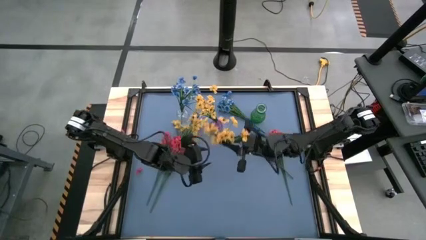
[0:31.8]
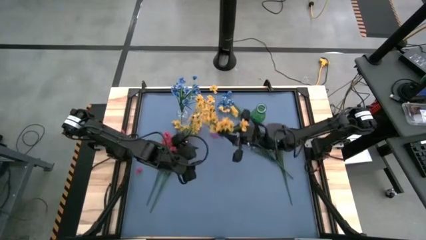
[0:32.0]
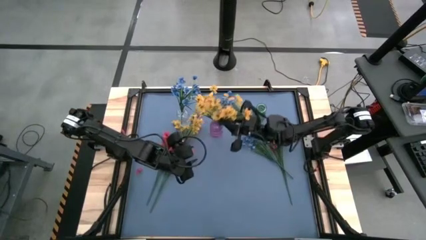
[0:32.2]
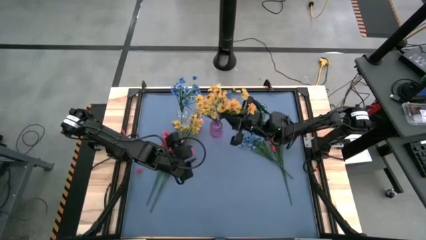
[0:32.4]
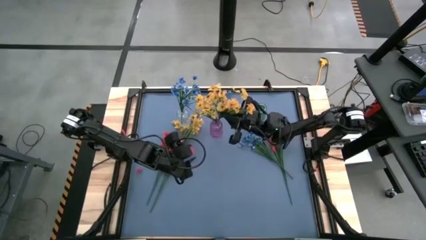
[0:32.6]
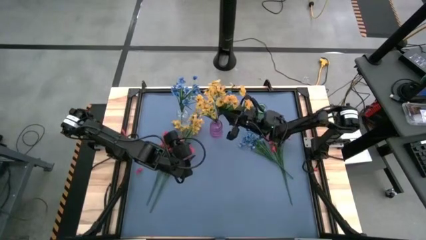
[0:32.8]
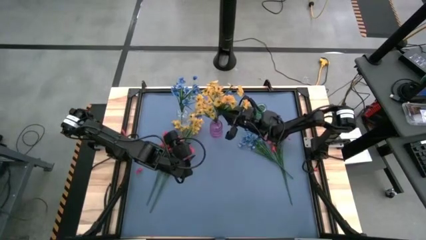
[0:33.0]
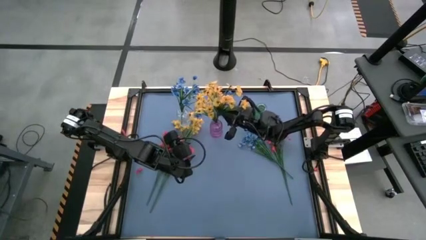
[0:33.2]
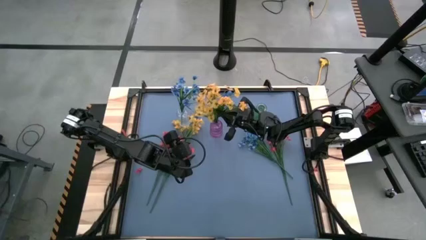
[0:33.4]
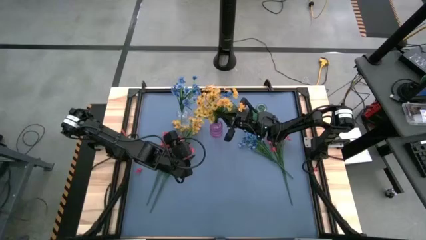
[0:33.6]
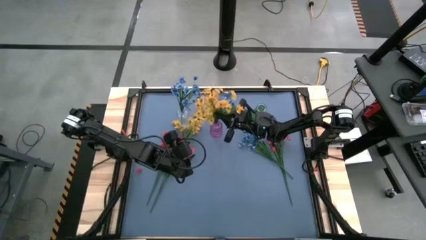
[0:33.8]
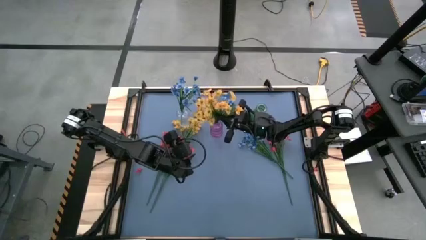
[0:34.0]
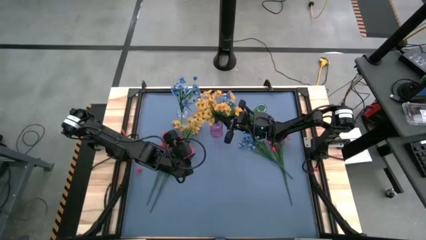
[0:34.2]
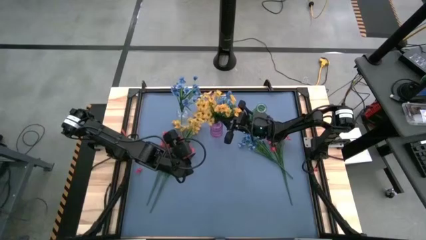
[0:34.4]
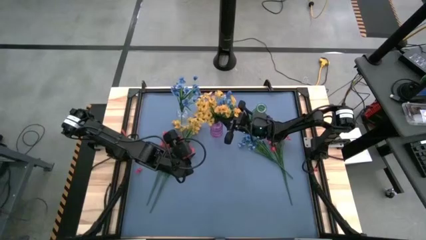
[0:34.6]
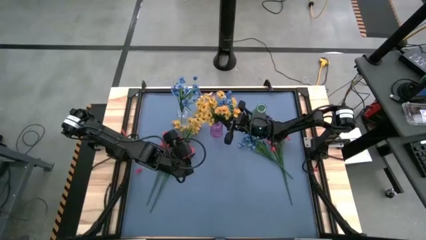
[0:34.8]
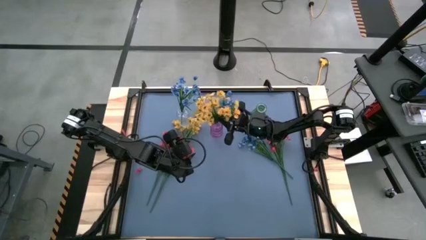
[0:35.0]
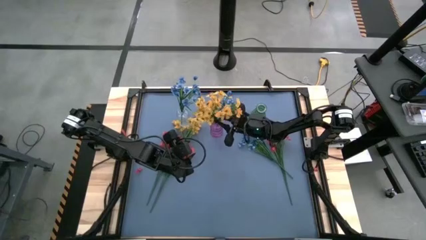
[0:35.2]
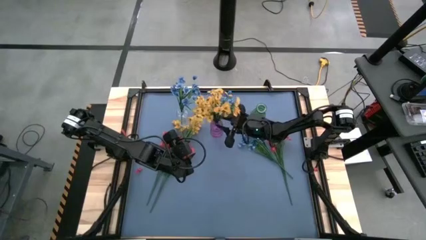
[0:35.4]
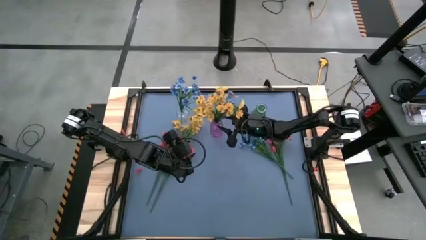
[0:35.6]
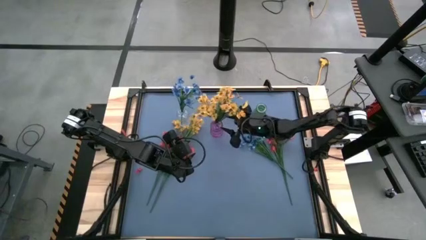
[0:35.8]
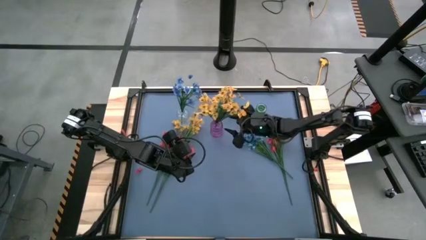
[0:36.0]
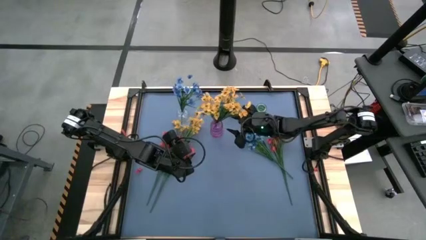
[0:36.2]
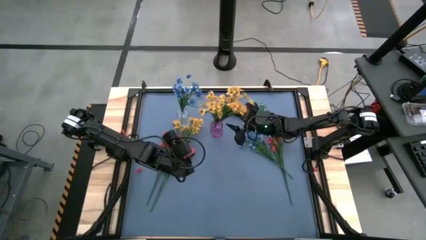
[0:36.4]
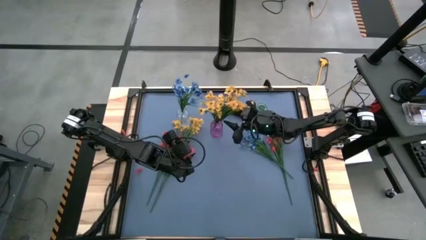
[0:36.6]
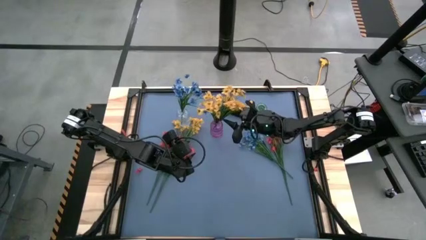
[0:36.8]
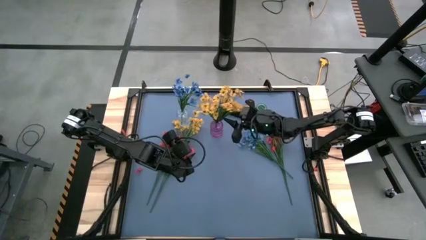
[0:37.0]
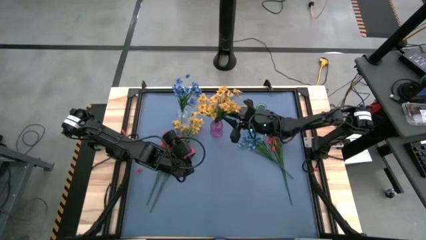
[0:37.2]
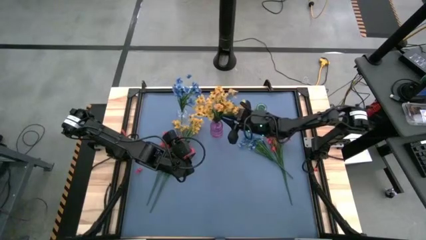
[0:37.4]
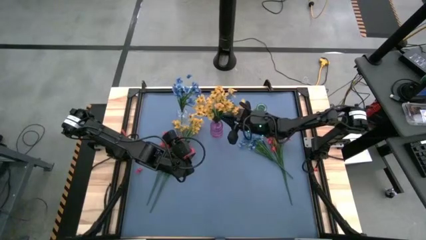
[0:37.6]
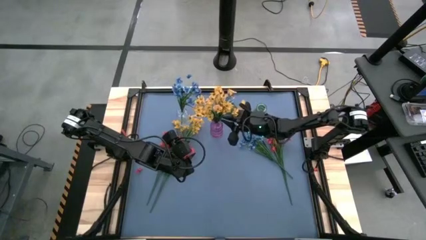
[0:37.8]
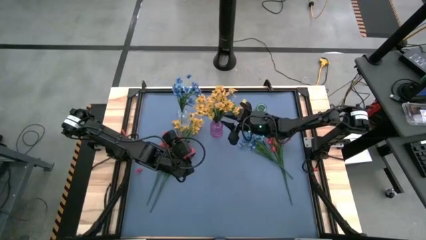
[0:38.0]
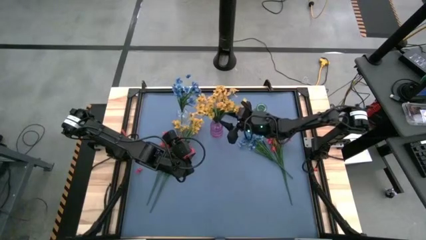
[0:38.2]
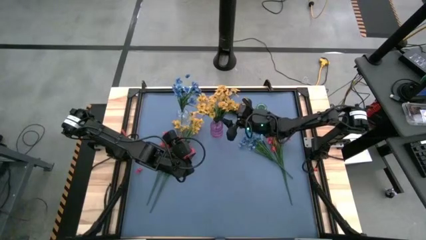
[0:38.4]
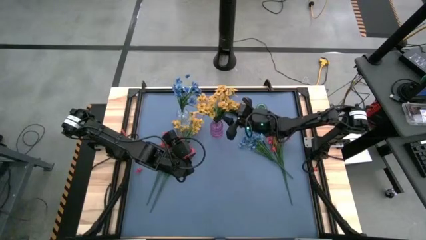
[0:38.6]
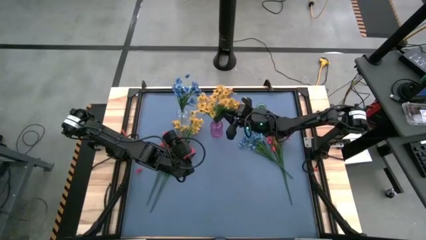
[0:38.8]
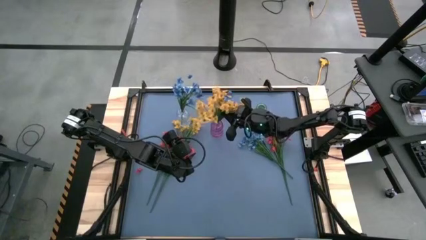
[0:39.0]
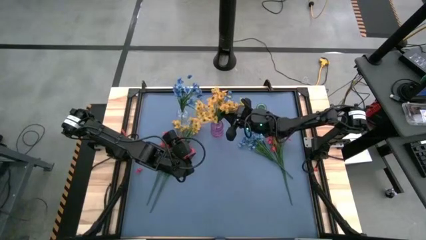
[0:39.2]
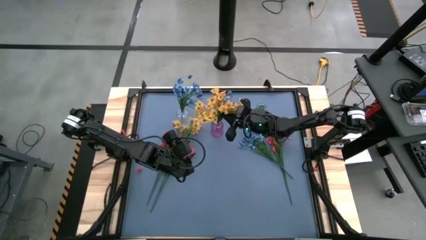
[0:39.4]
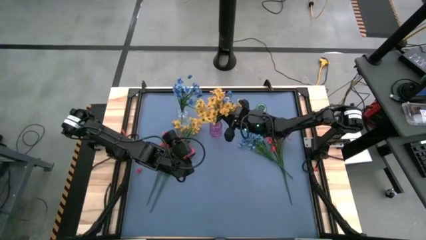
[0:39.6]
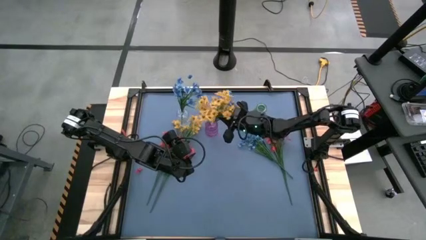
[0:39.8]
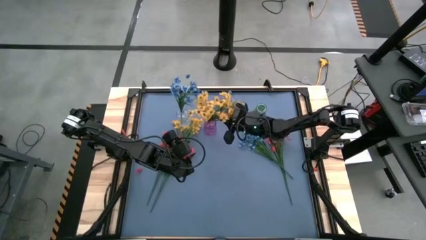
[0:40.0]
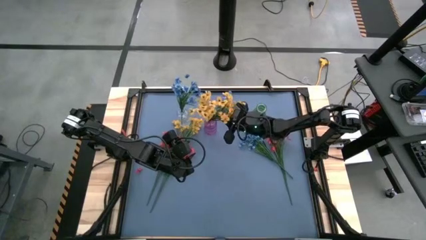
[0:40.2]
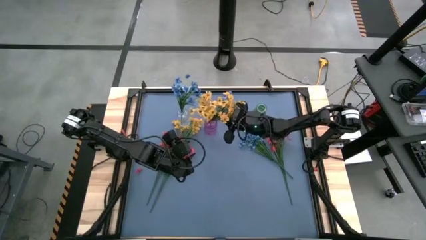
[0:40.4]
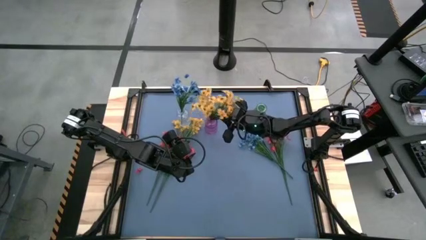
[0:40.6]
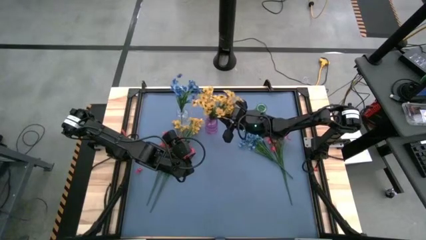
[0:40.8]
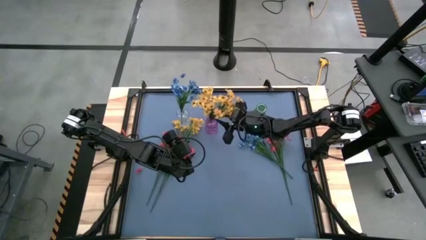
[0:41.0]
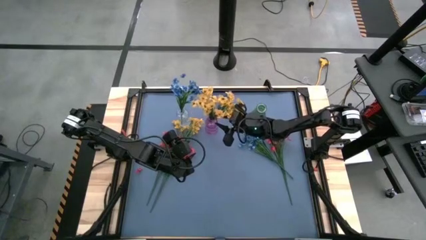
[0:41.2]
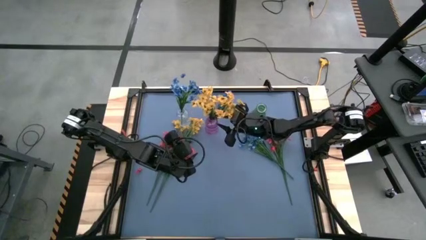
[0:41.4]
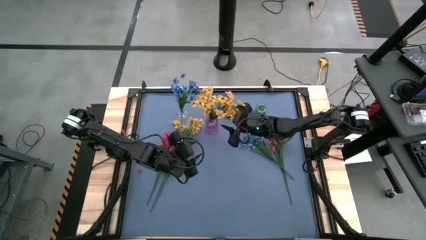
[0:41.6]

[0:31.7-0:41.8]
Task: Sort flowers into vase by color
Put the right yellow flowers into the violet vase

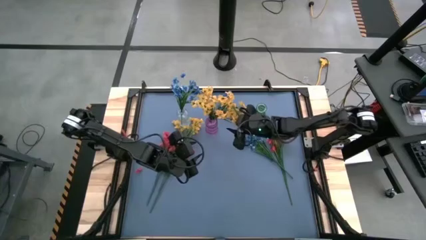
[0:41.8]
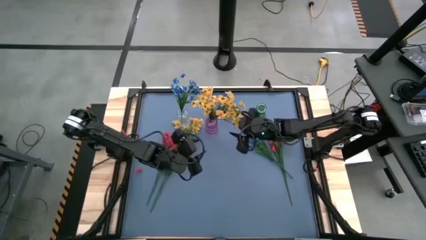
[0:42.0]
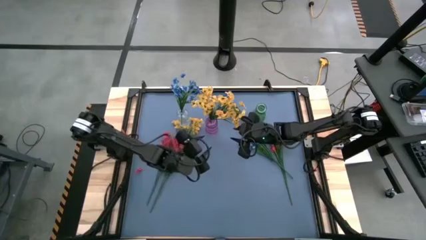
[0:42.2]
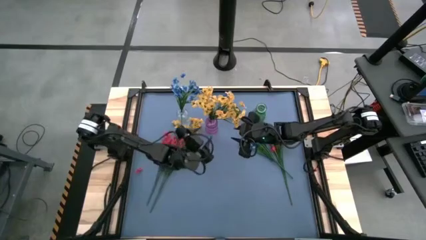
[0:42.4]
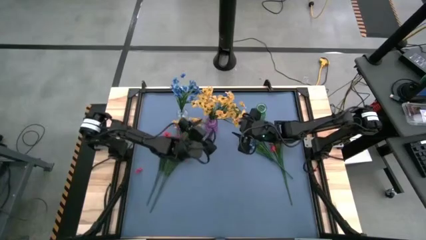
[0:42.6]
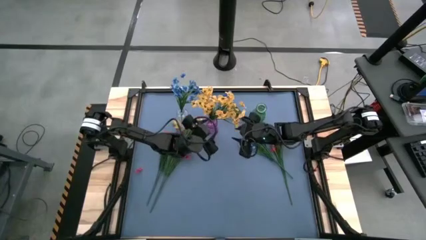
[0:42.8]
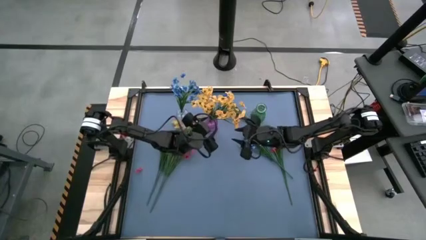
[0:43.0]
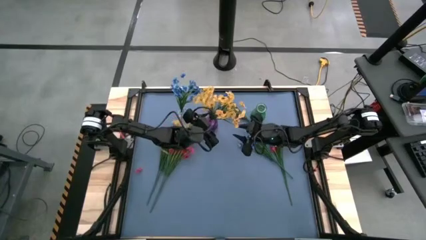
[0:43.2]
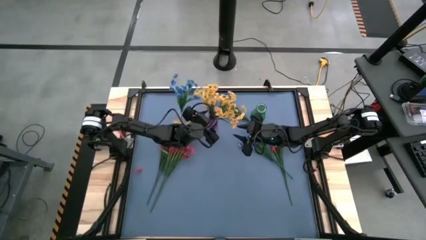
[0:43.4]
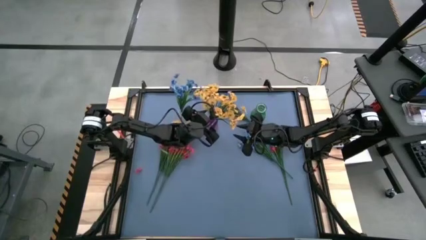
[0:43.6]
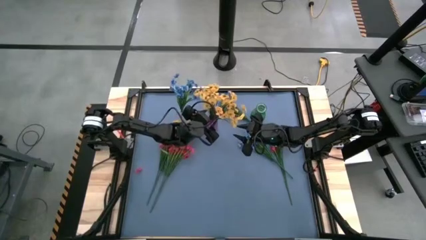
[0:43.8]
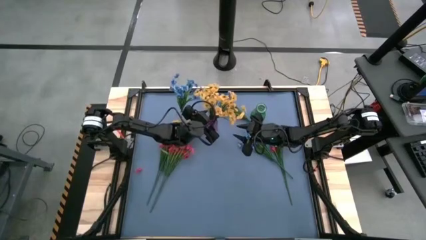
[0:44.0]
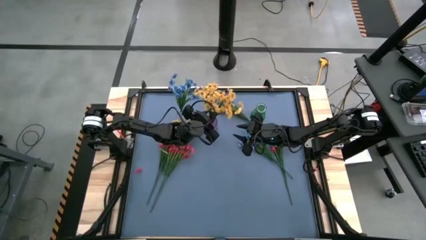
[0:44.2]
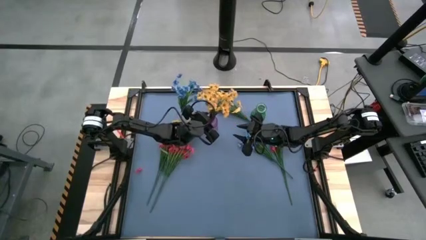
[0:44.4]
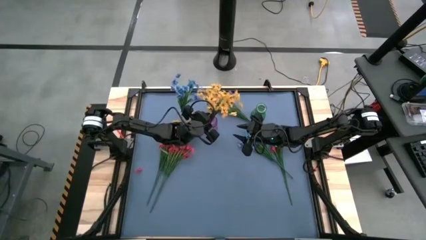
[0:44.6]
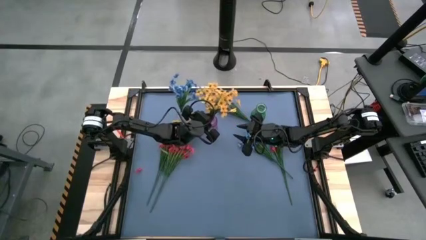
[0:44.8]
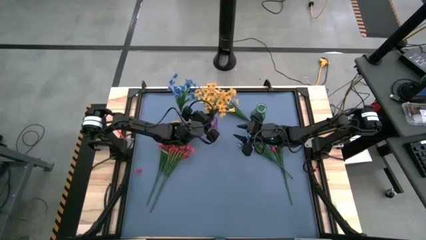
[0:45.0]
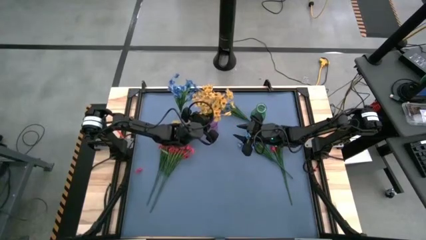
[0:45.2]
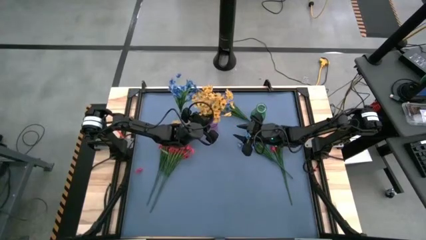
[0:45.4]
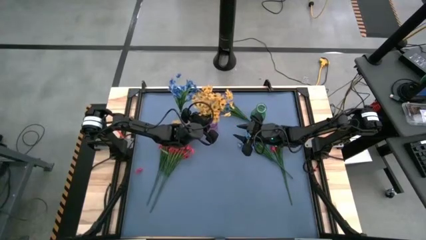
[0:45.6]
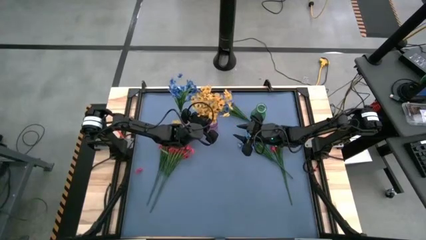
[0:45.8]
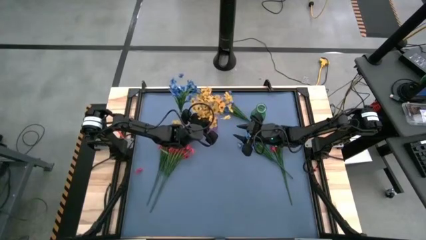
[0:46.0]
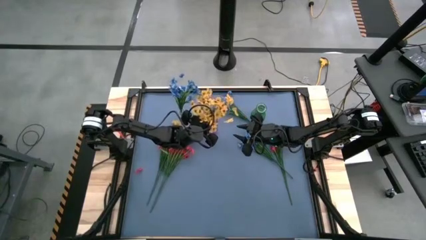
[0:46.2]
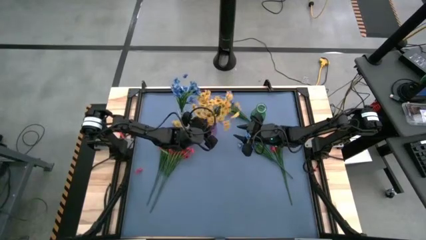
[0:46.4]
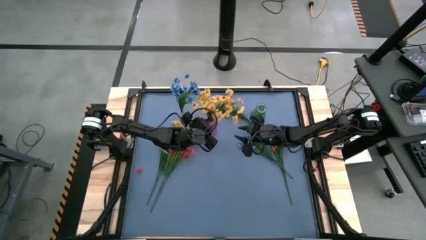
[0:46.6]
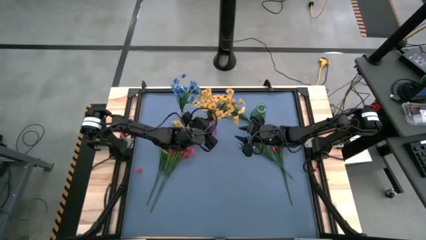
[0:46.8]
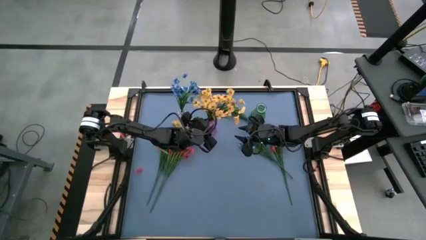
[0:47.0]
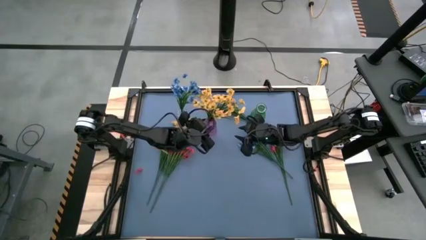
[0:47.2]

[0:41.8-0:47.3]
Adjust the yellow flowers in the violet vase
